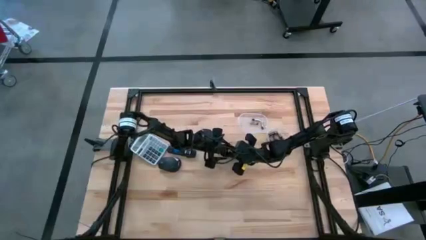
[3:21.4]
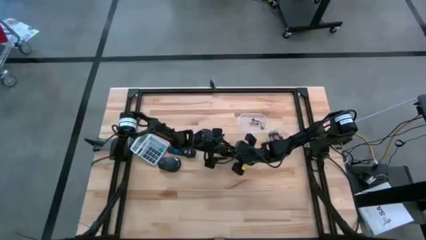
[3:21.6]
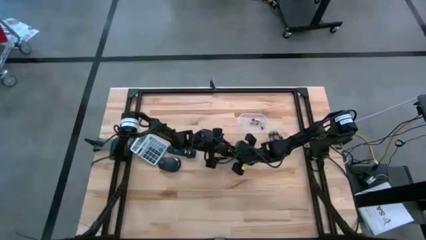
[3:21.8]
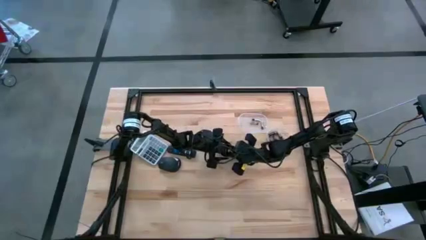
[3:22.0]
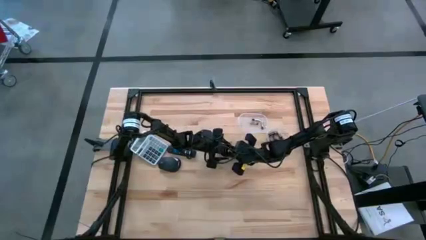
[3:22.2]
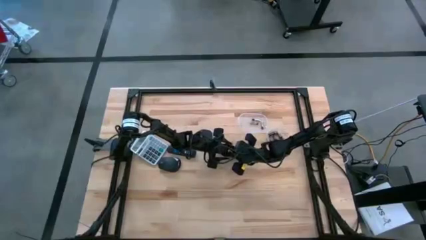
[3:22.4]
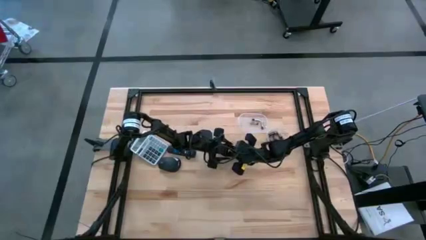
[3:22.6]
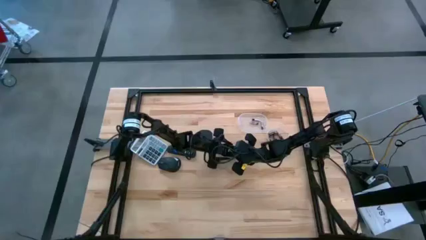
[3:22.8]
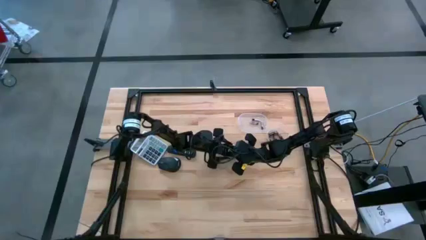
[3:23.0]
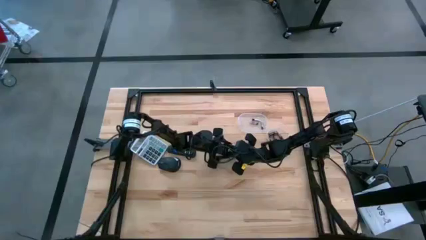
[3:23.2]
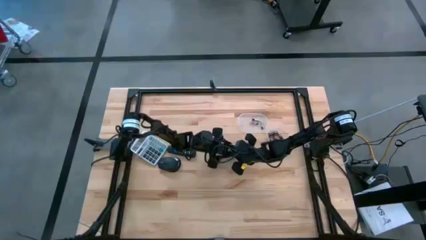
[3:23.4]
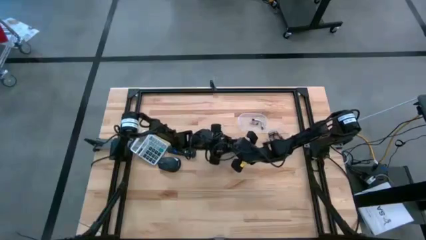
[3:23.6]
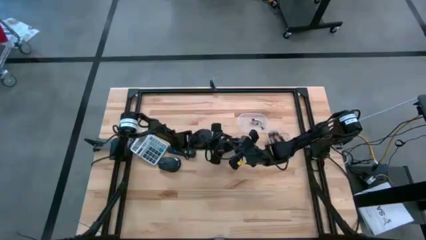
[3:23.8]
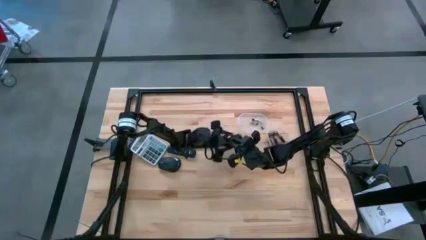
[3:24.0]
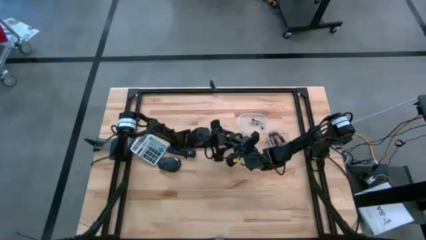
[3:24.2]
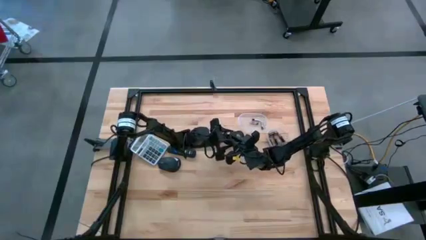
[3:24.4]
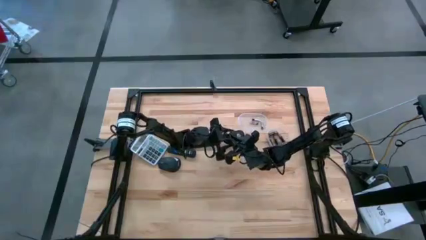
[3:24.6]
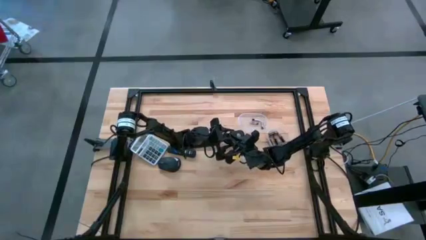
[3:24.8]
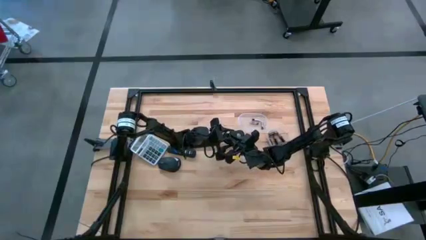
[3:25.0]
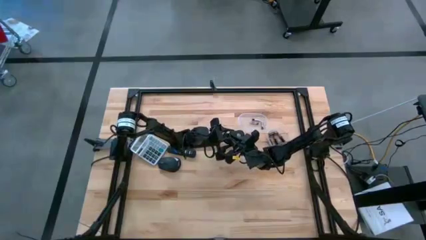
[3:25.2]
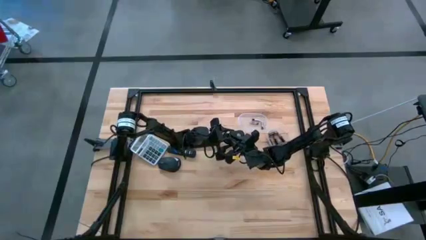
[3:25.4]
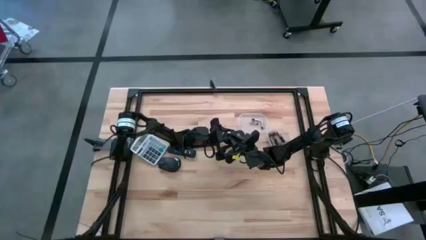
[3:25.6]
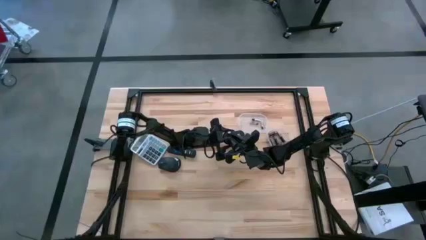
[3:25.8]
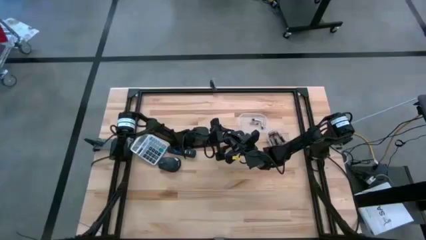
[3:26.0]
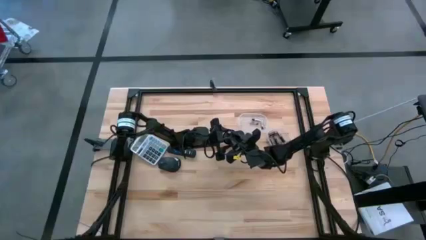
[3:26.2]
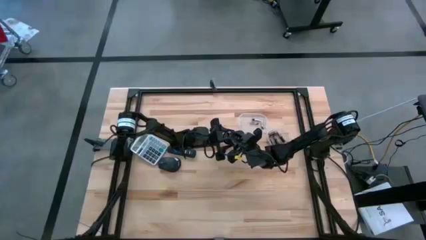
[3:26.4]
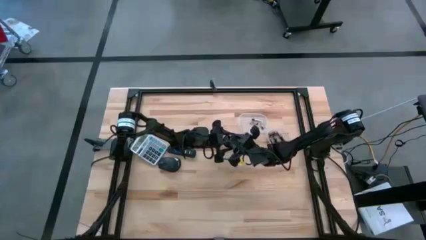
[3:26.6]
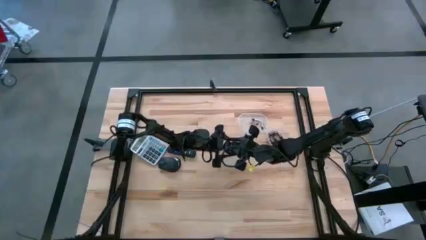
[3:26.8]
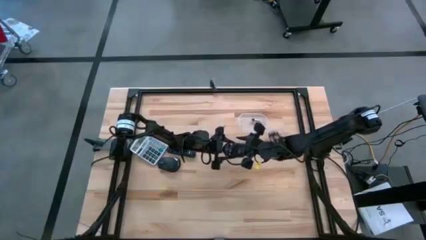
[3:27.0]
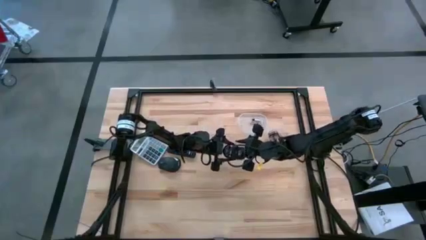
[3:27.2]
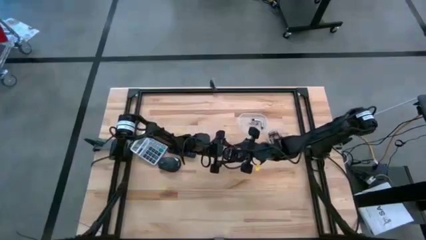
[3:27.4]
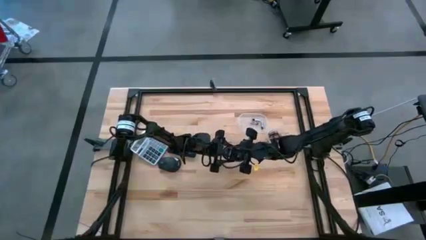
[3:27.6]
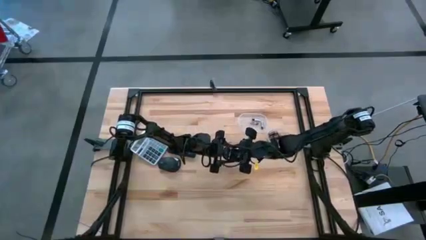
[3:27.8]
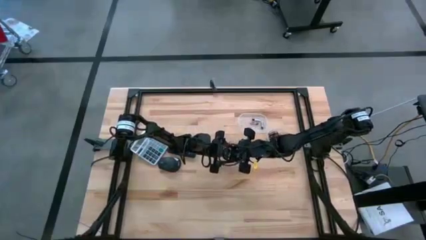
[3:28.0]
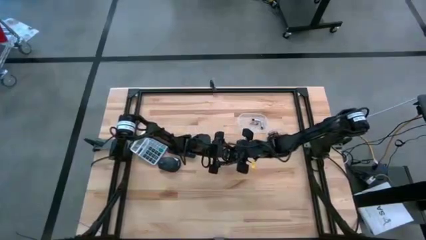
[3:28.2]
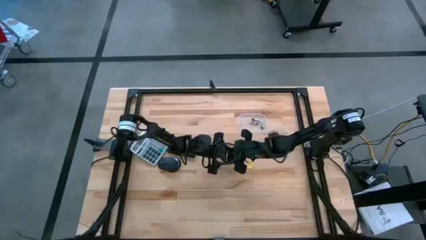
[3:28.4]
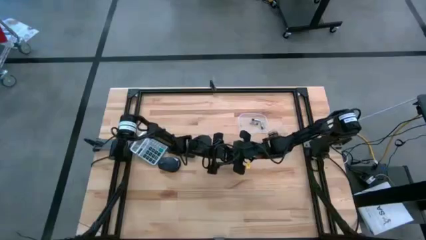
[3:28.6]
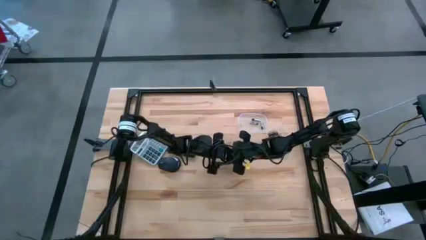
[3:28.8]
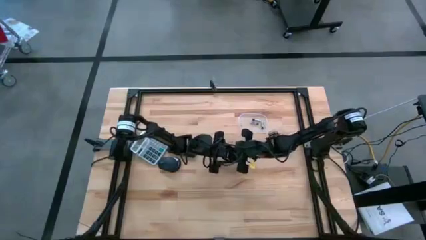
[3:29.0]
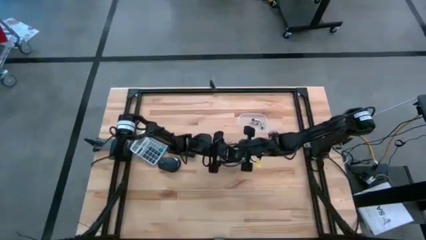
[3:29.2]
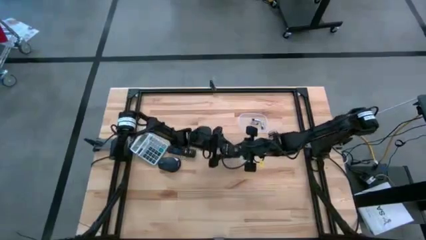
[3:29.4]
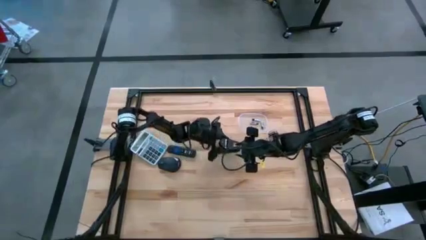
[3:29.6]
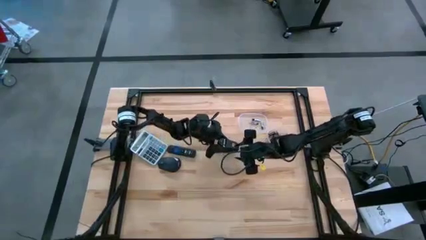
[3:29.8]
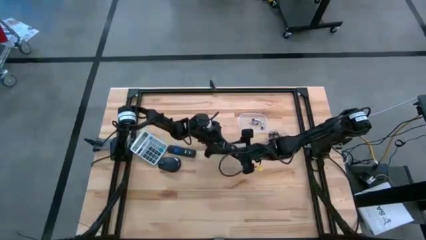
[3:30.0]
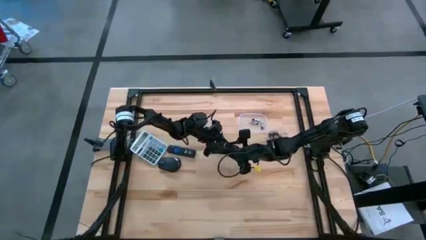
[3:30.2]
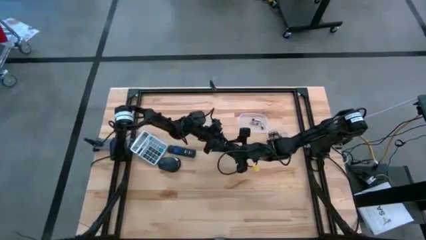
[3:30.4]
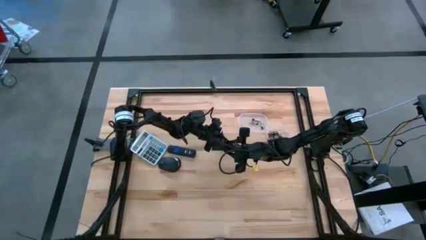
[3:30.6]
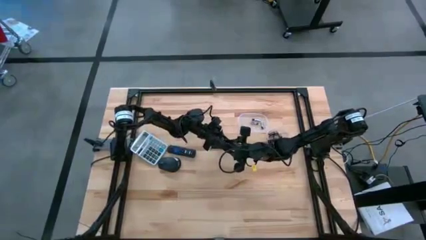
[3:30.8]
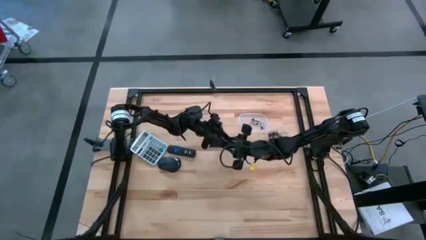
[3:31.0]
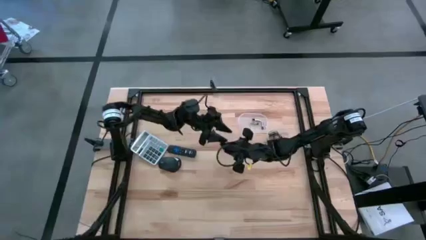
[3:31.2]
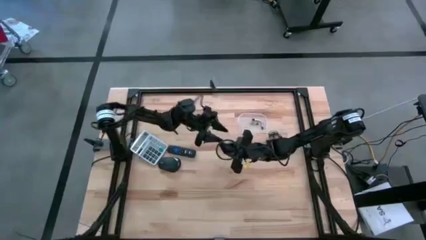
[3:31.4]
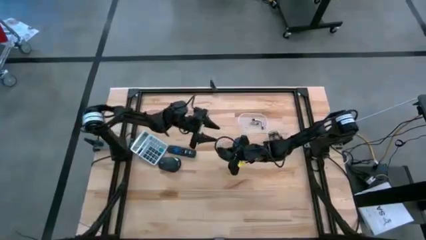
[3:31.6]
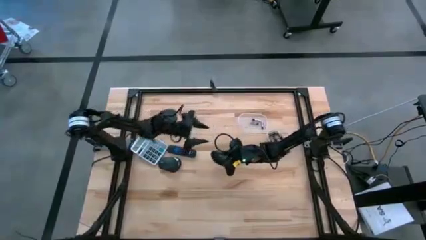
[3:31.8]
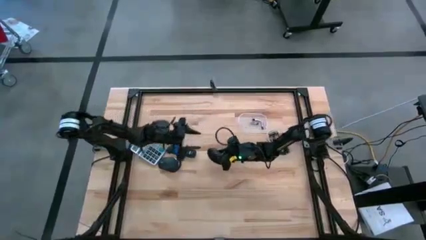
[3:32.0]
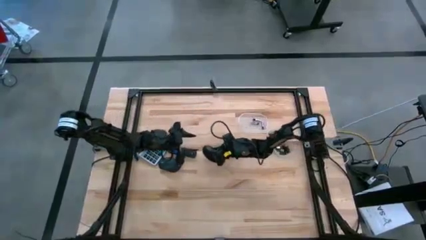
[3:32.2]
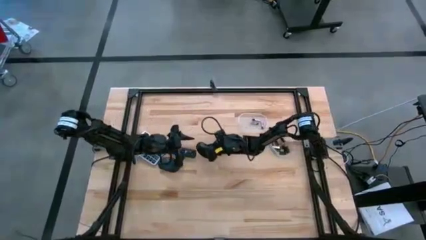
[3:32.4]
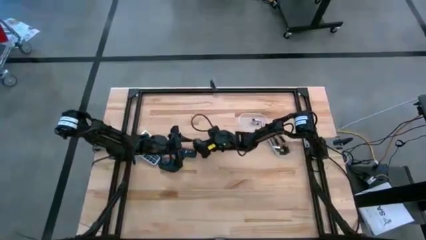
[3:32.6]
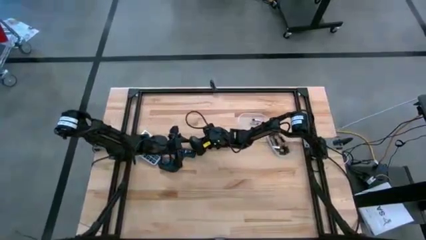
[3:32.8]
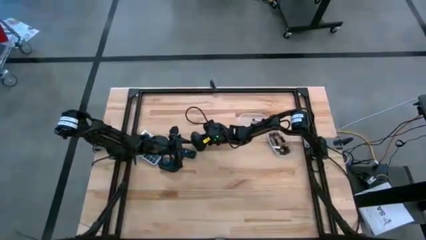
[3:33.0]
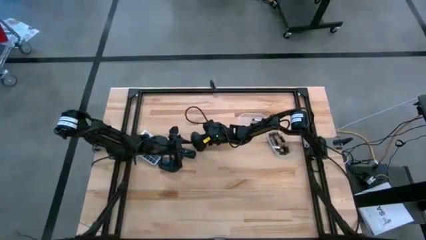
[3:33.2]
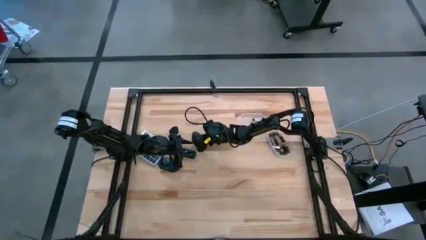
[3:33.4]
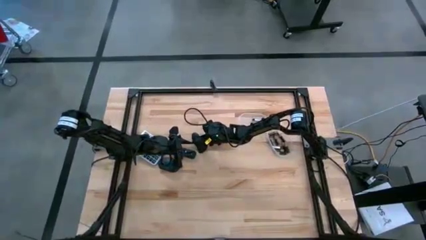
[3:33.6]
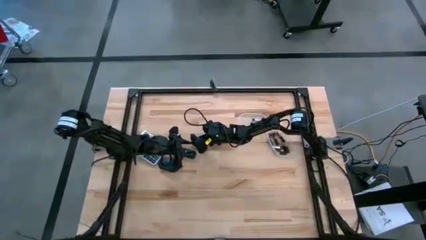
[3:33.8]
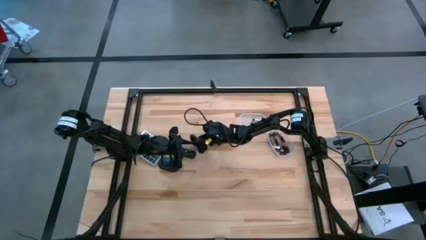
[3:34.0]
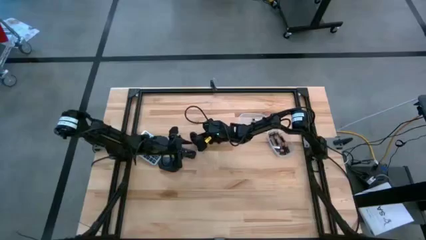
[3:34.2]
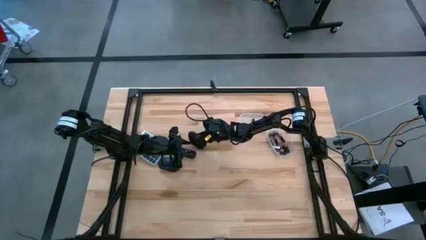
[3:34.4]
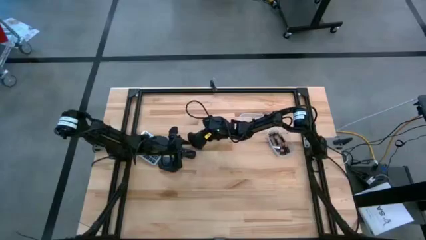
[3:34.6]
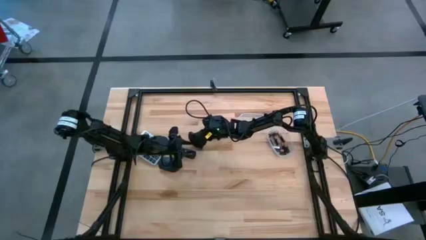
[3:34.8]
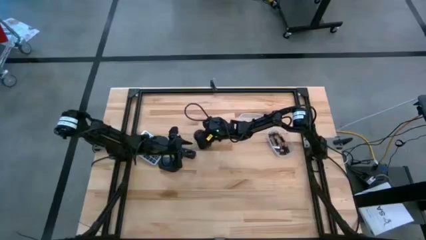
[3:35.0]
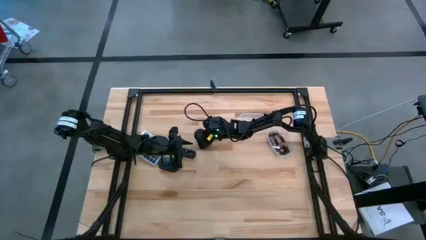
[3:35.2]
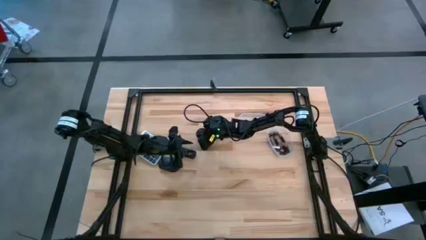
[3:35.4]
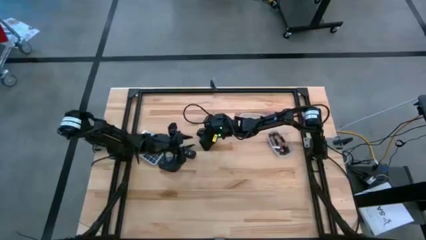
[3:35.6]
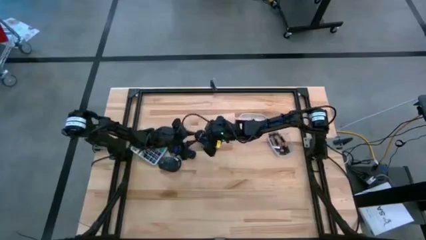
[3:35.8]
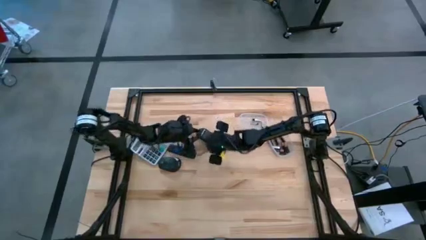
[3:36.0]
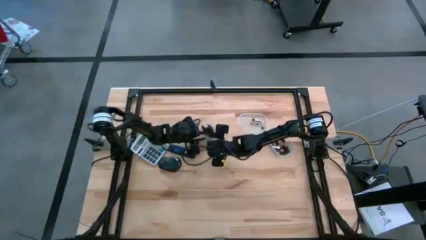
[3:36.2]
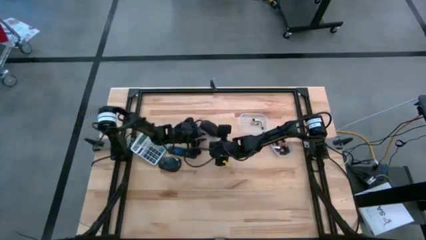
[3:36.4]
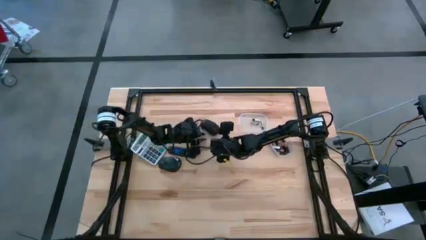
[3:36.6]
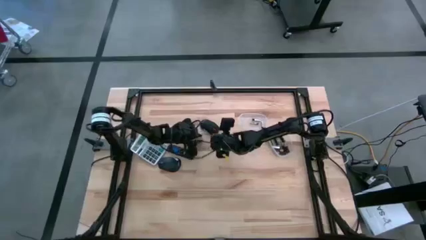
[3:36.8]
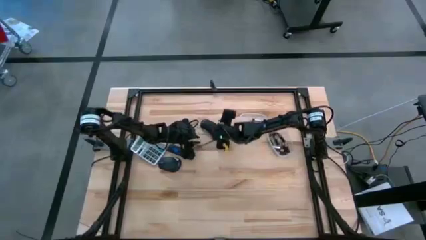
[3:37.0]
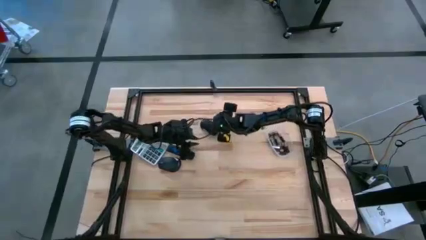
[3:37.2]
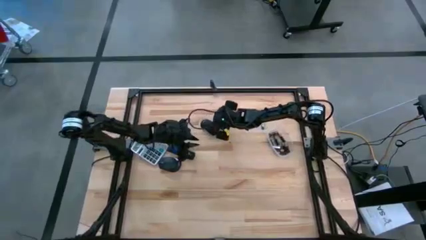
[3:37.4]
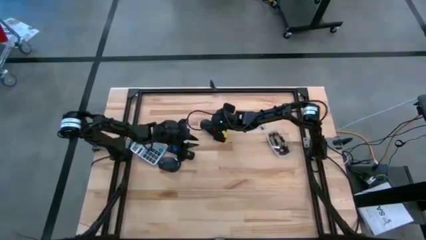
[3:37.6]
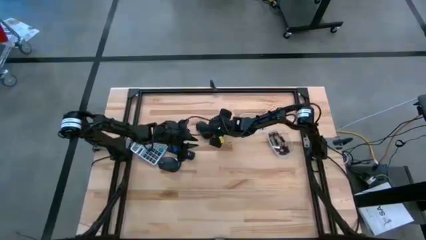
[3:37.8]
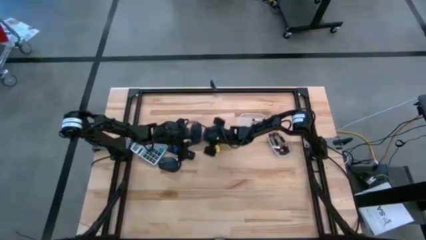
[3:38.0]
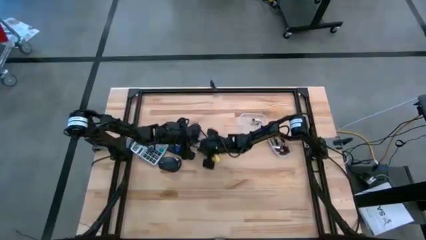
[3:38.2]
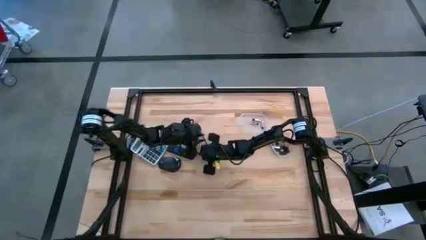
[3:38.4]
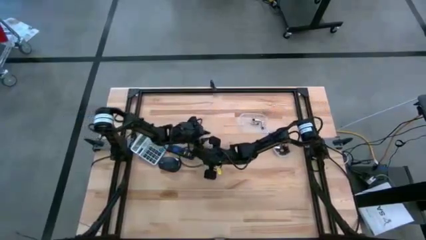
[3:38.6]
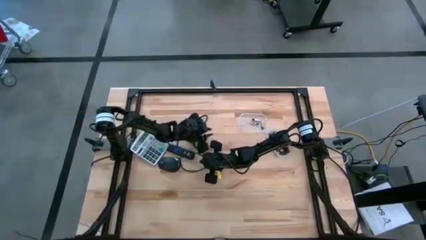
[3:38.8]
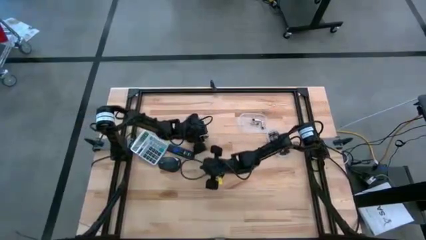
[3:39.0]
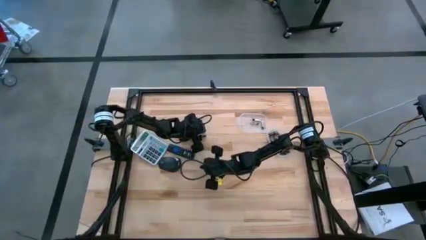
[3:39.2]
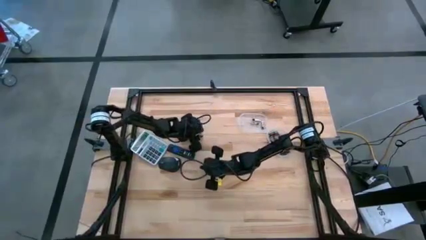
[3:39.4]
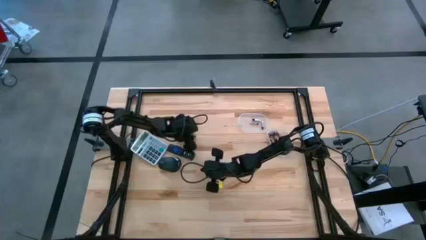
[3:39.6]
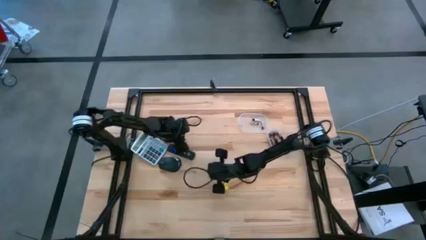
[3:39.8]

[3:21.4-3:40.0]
Task: Insert battery
Insert the brown battery into the black mouse battery compartment
